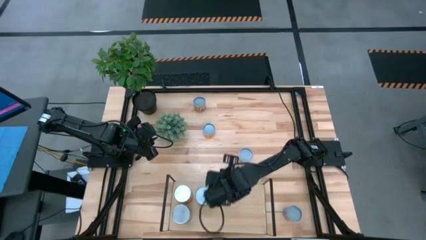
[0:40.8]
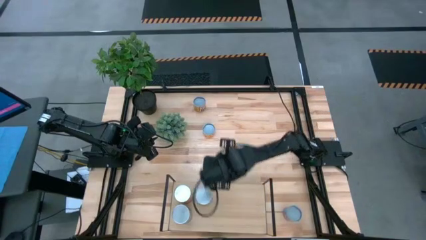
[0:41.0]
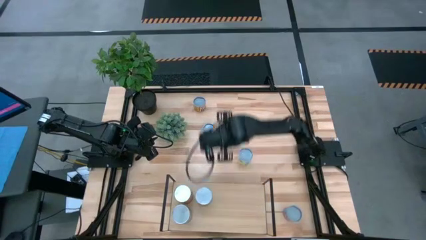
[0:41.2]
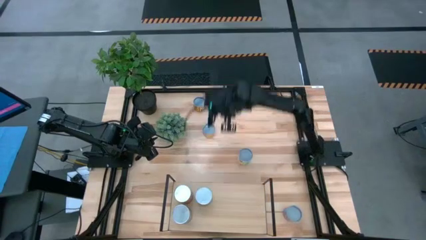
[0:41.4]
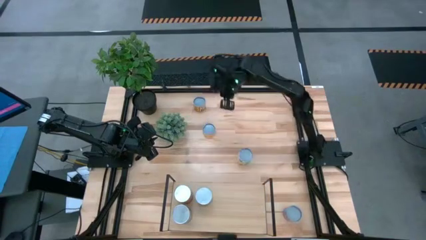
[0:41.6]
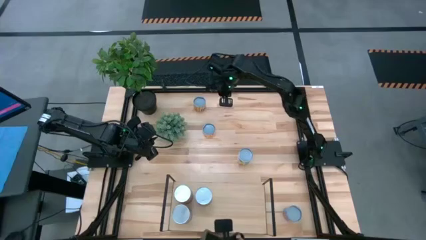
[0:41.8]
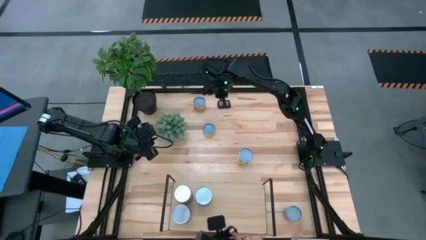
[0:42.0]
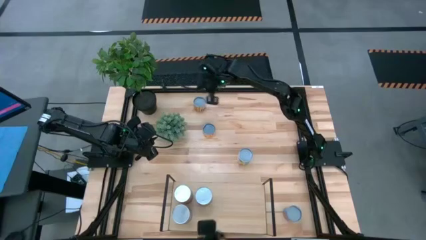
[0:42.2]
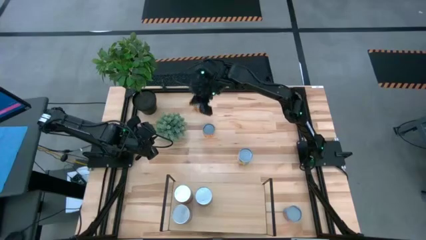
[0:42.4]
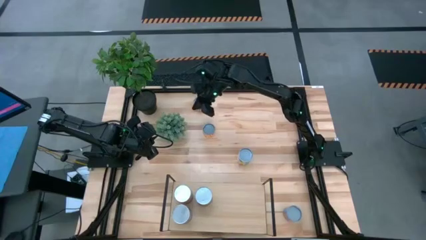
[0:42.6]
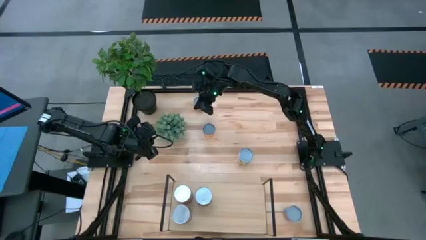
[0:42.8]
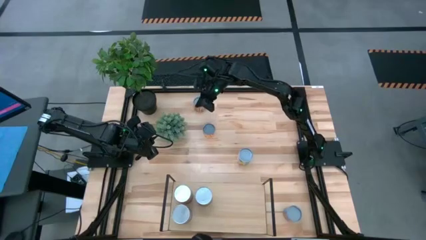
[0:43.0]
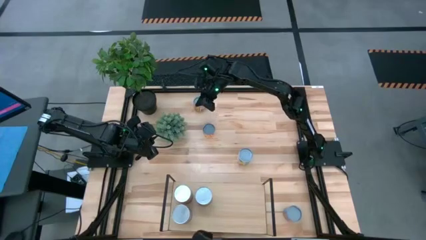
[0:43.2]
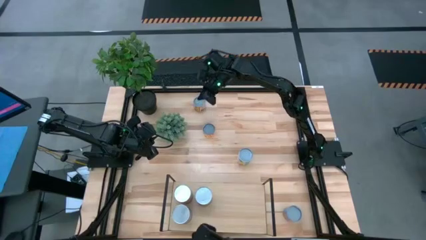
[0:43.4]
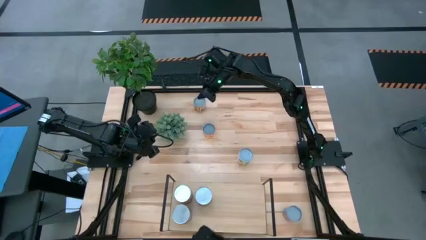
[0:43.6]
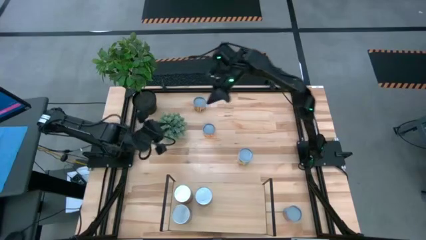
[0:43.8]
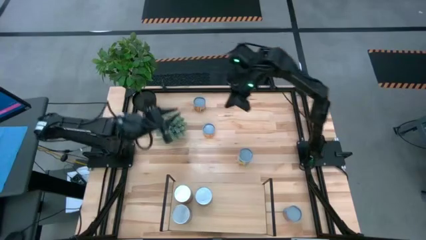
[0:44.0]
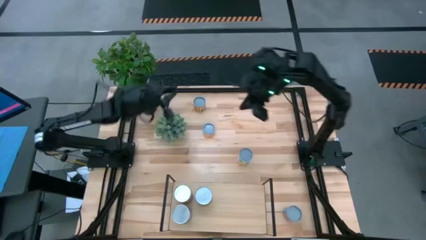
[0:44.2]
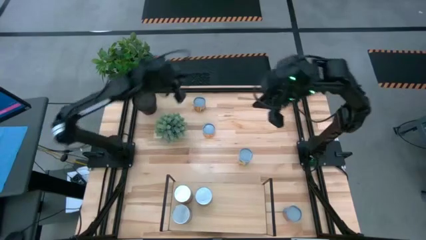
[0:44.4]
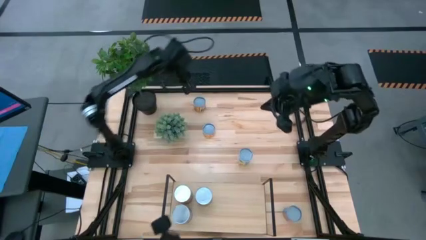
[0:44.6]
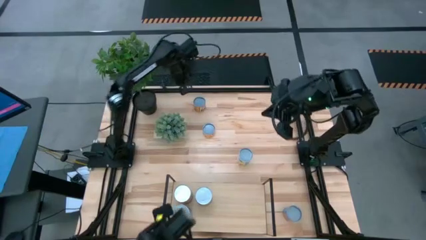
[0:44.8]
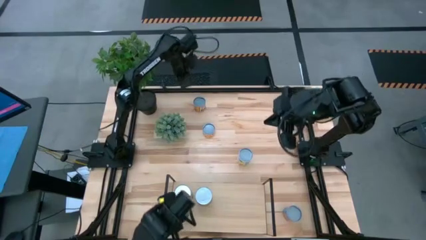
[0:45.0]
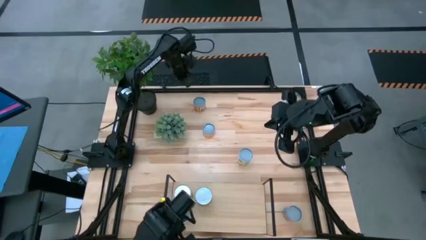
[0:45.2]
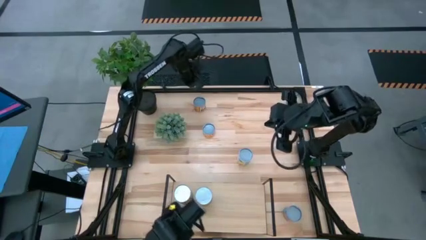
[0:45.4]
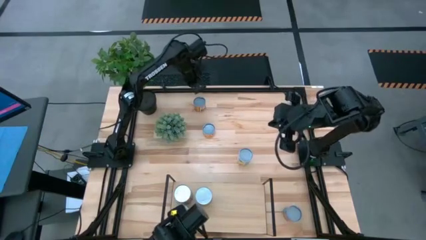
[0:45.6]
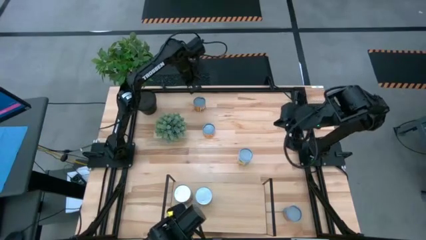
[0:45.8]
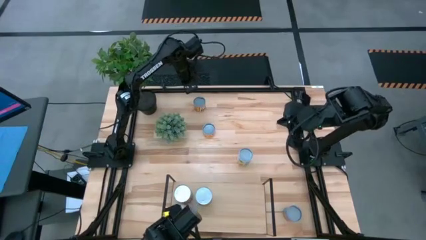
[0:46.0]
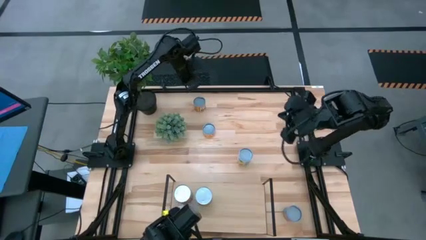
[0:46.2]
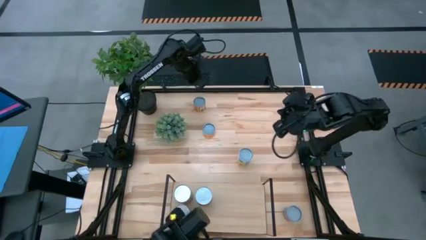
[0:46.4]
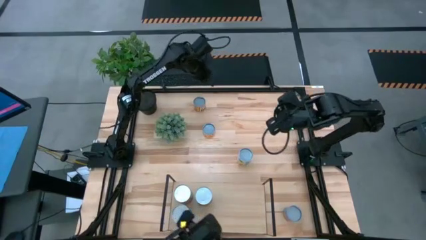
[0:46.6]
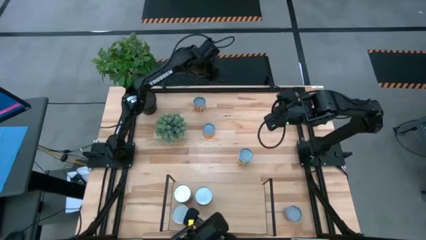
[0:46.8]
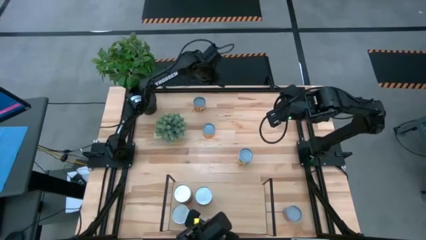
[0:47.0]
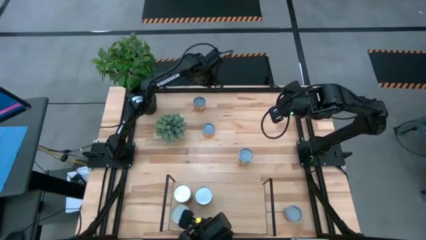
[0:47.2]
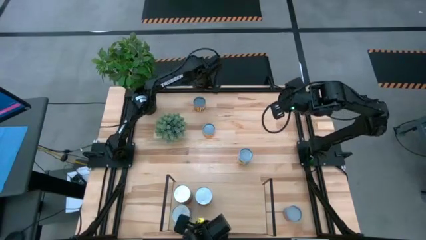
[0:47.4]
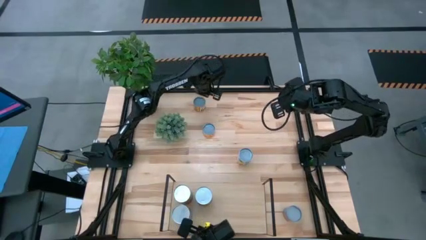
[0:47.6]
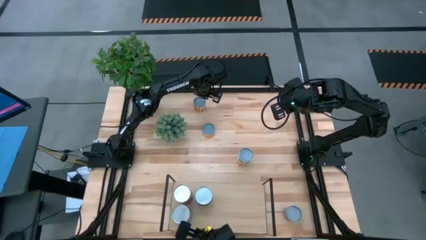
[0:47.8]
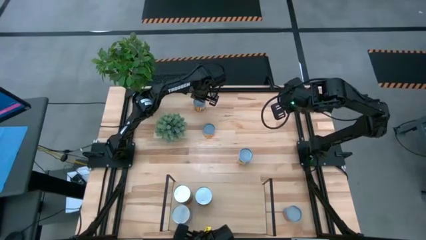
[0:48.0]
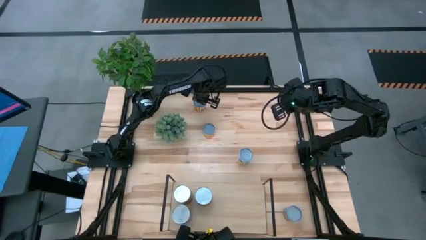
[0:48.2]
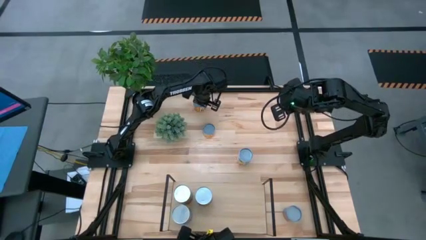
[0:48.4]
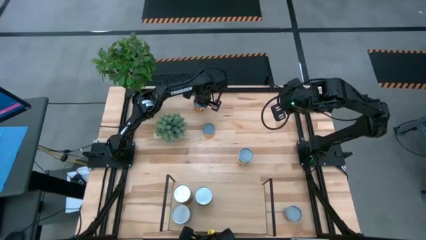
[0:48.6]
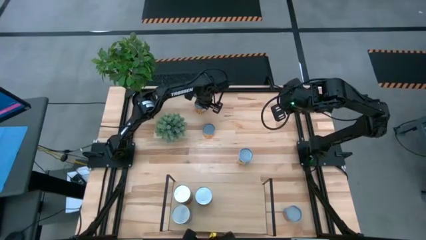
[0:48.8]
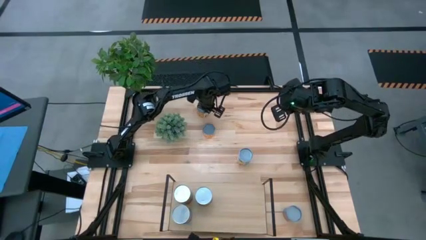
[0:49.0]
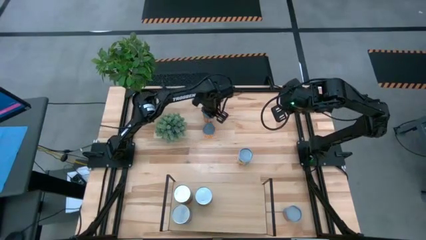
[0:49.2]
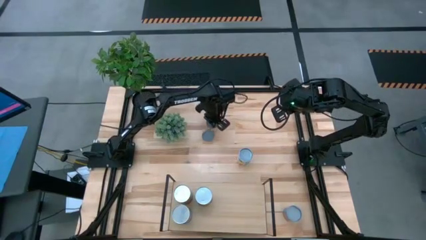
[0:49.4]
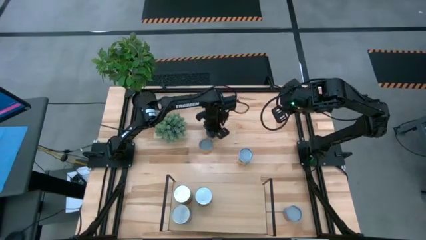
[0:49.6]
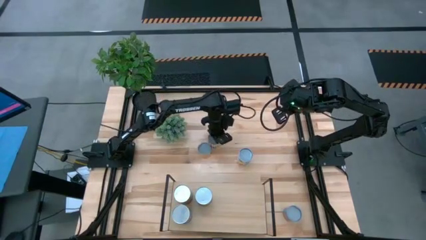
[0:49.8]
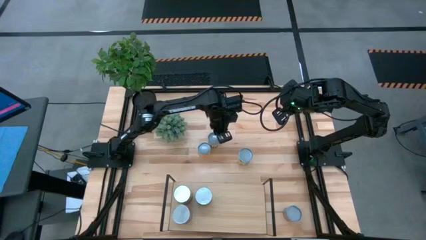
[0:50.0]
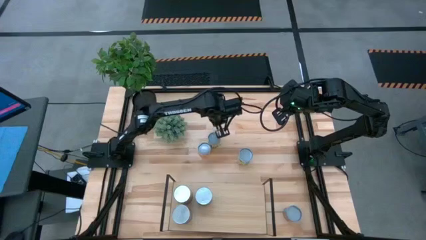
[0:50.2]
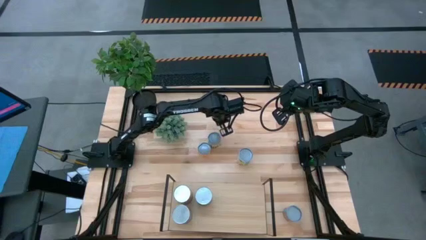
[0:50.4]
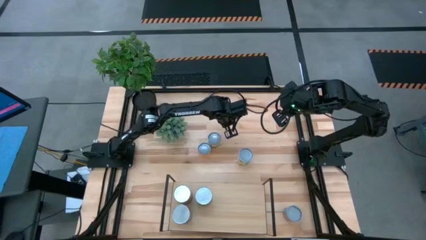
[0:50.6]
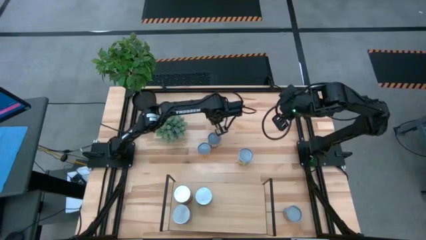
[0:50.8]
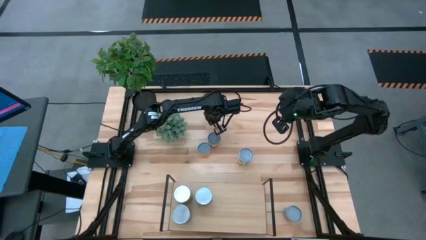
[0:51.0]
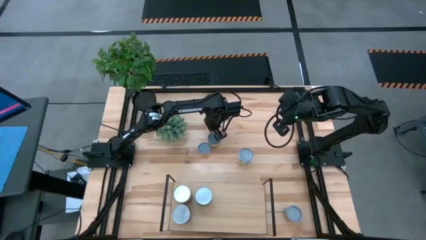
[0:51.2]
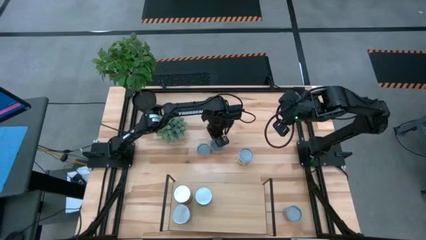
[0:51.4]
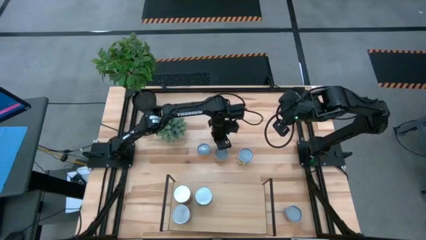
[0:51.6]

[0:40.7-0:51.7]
Task: Pick and place cans onto a shelf
Move the can of black beans to the center

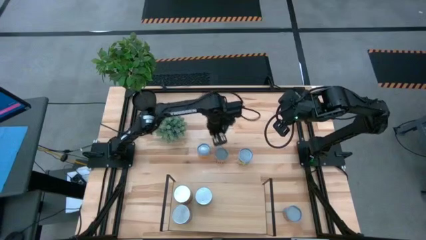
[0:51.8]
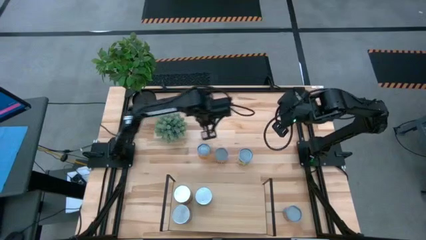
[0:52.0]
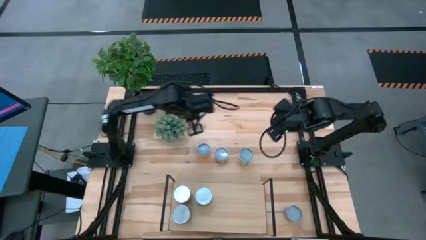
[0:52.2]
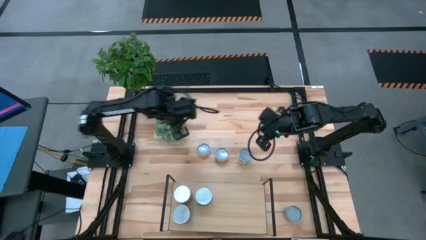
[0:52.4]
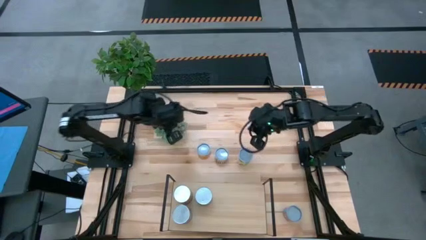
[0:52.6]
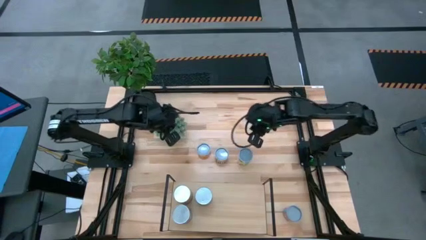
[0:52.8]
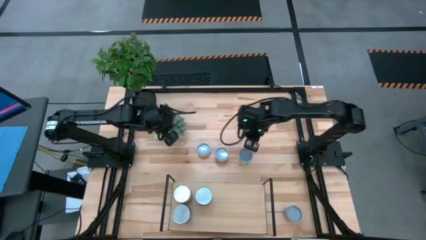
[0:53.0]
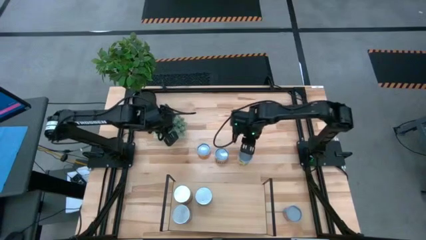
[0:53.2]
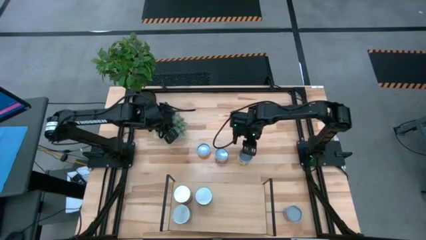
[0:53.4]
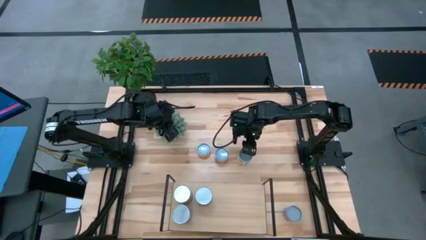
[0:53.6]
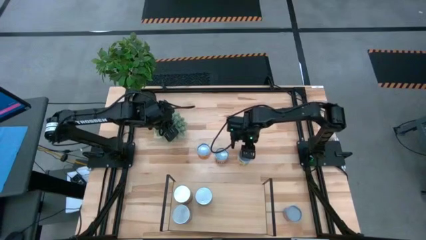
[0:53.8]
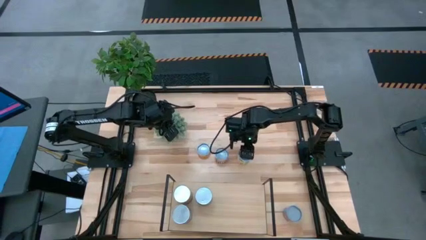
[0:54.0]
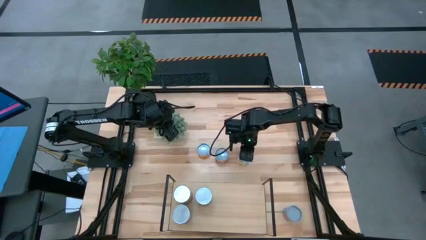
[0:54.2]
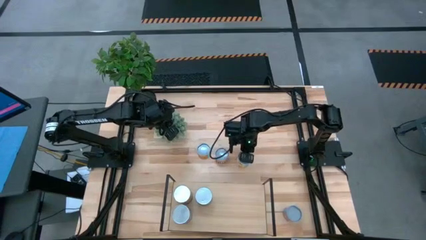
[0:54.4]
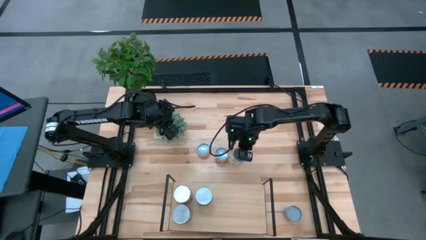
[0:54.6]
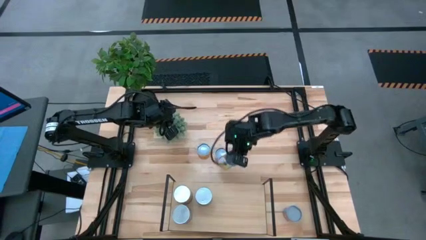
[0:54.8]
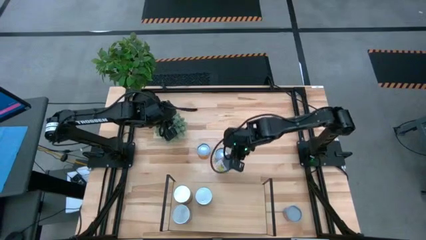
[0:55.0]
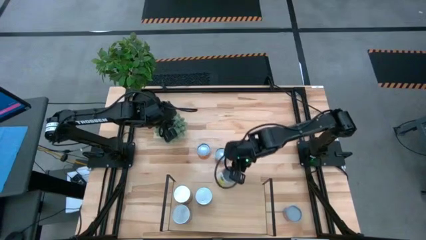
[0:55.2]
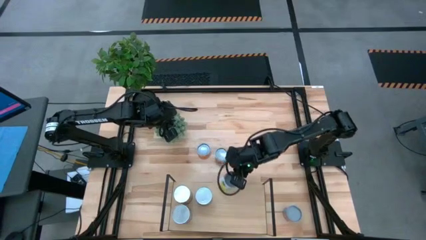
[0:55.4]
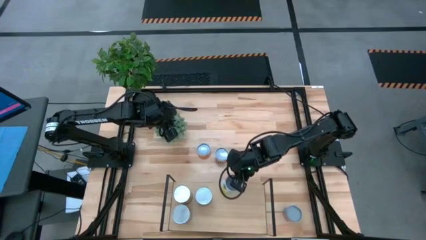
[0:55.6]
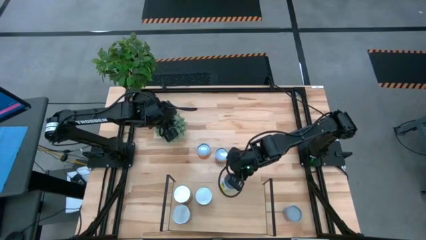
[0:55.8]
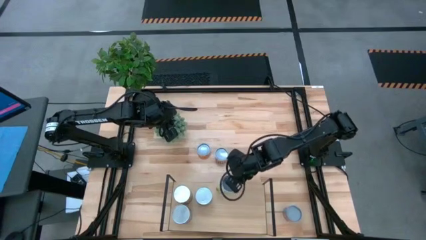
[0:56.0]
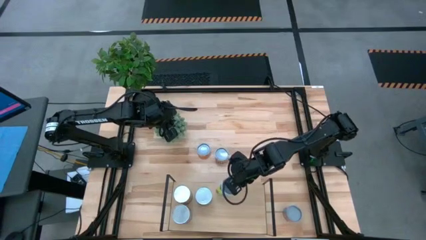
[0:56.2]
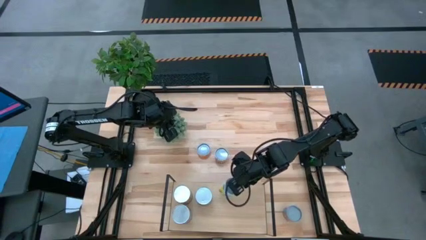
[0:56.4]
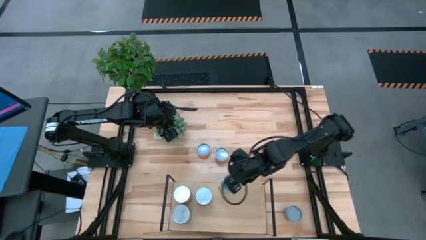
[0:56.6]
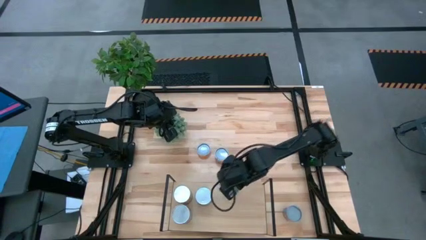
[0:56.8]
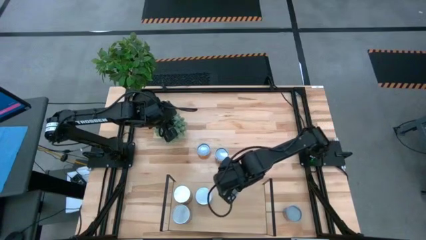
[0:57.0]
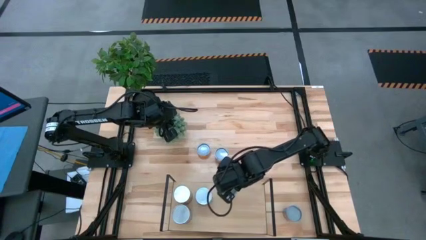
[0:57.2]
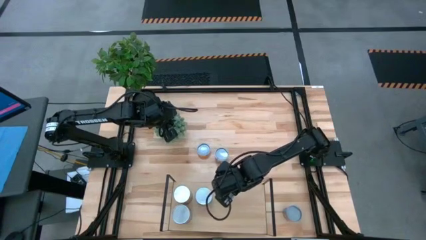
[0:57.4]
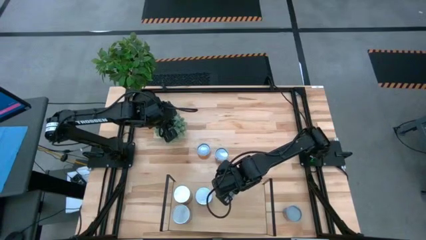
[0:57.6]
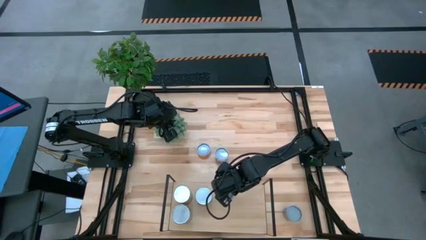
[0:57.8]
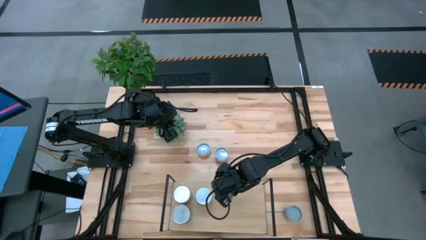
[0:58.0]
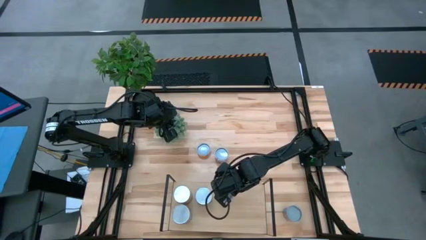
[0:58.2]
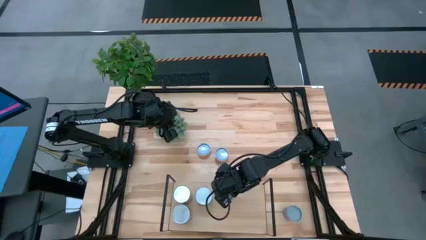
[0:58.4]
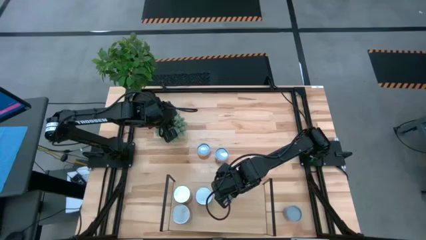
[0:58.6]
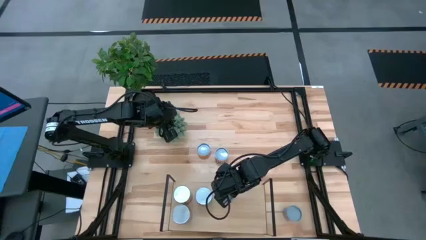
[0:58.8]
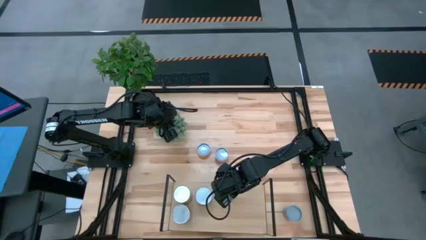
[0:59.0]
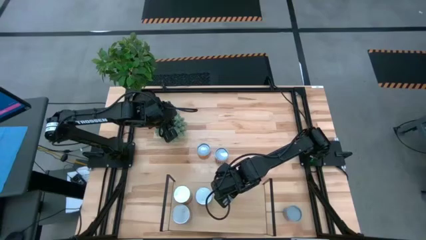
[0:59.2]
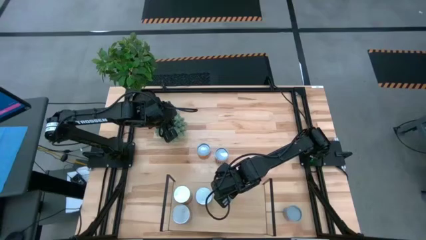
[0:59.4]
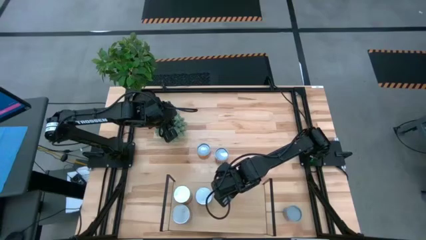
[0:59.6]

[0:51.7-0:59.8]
Put the canned mixed fruit on the shelf
